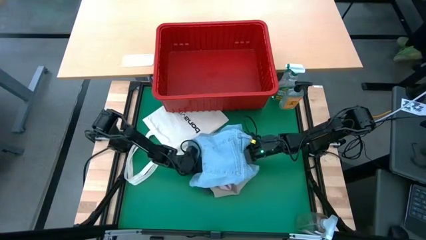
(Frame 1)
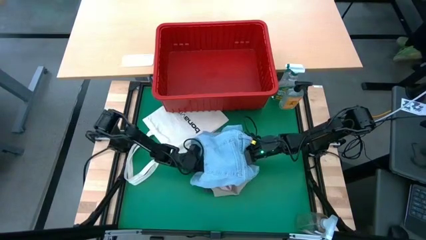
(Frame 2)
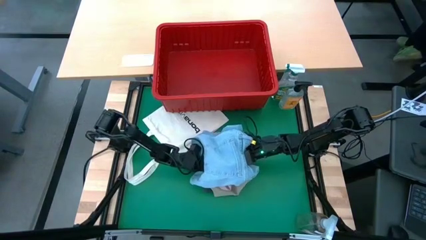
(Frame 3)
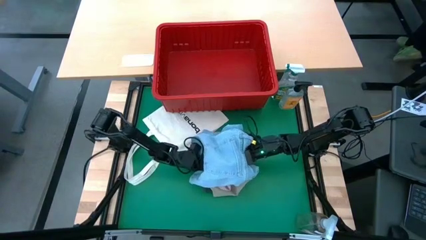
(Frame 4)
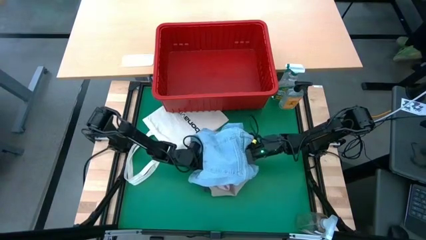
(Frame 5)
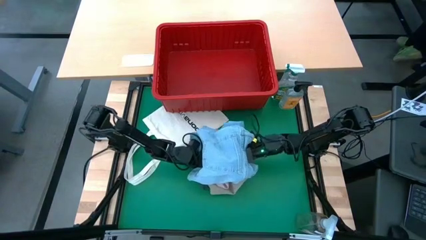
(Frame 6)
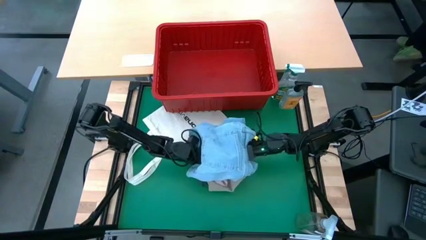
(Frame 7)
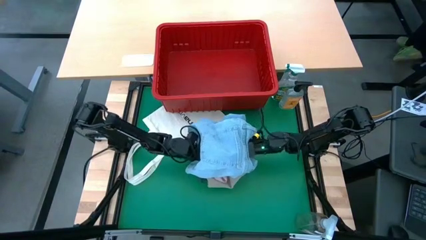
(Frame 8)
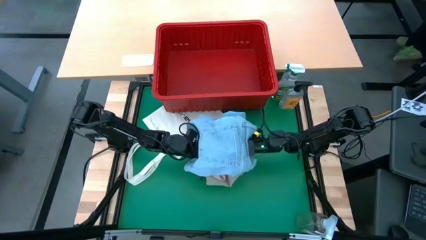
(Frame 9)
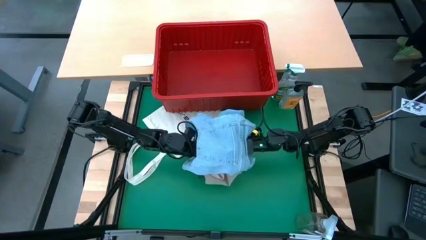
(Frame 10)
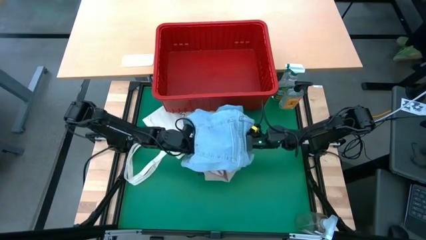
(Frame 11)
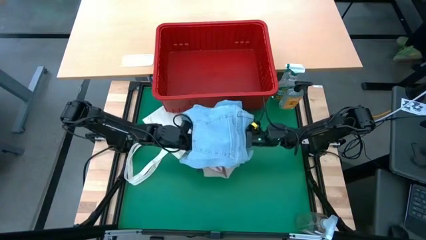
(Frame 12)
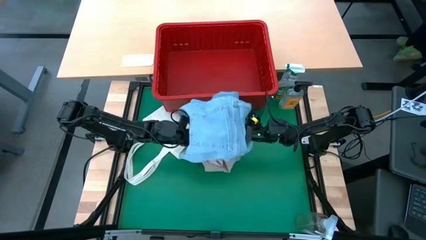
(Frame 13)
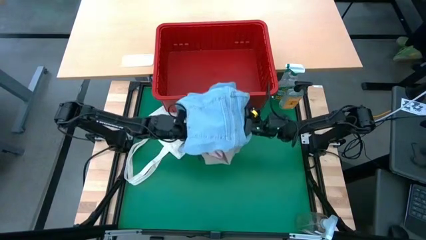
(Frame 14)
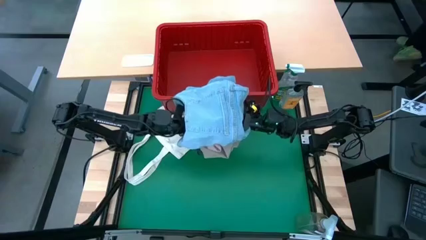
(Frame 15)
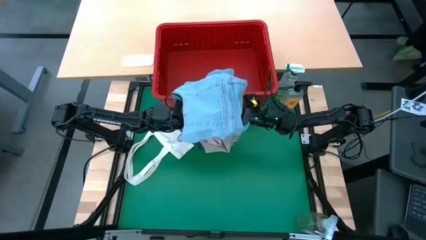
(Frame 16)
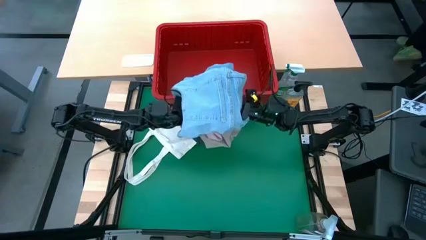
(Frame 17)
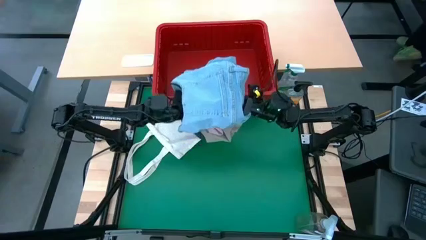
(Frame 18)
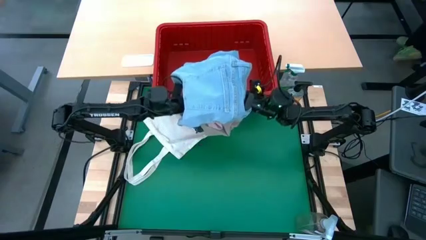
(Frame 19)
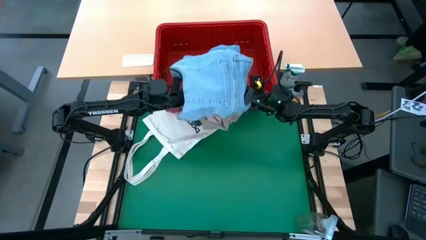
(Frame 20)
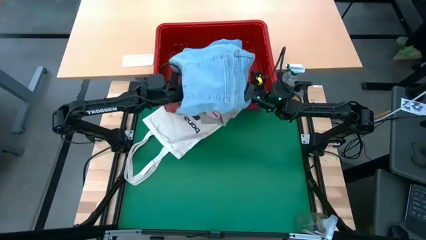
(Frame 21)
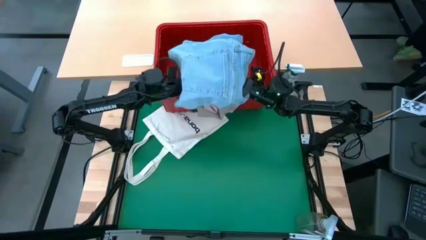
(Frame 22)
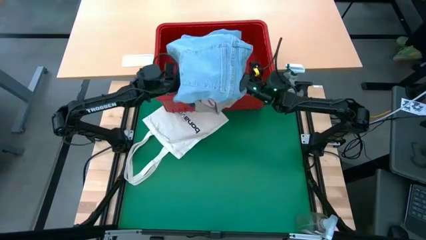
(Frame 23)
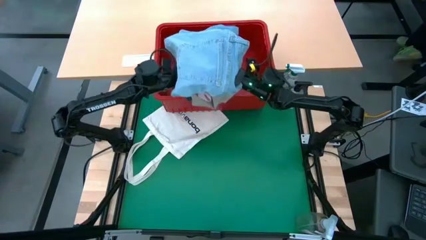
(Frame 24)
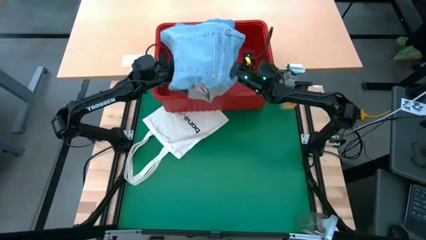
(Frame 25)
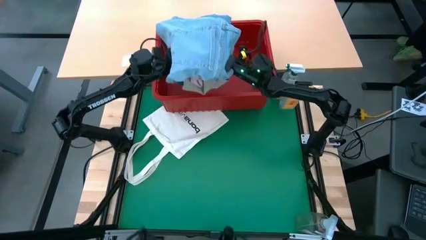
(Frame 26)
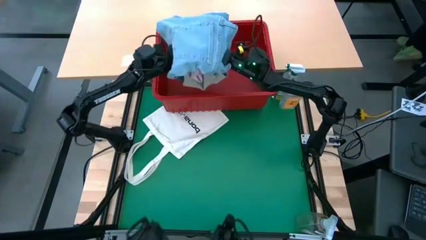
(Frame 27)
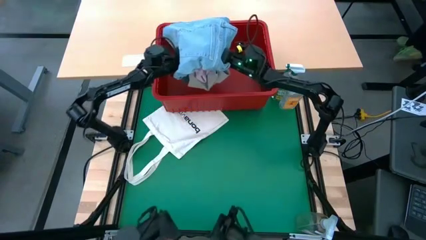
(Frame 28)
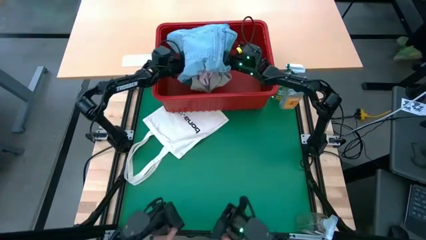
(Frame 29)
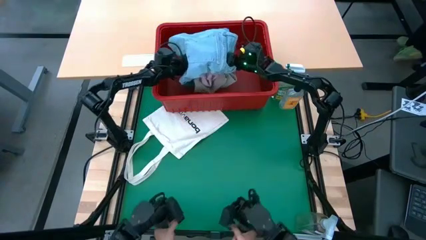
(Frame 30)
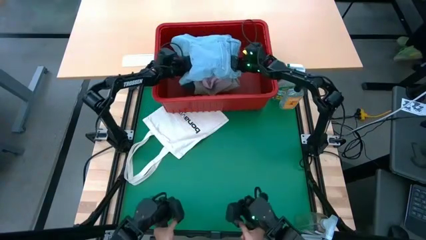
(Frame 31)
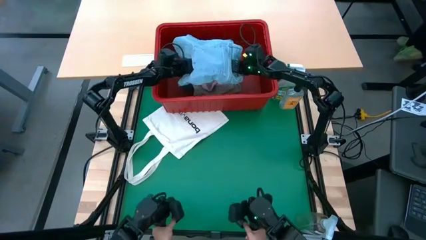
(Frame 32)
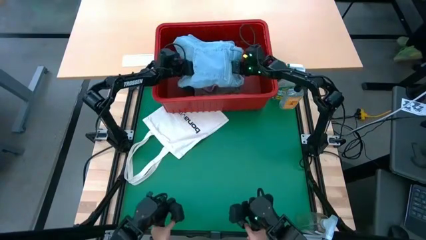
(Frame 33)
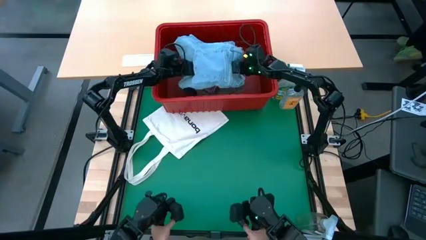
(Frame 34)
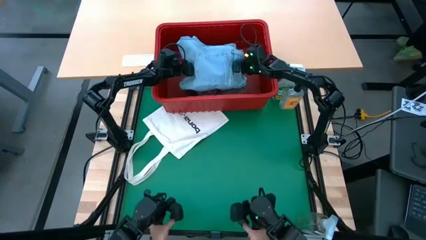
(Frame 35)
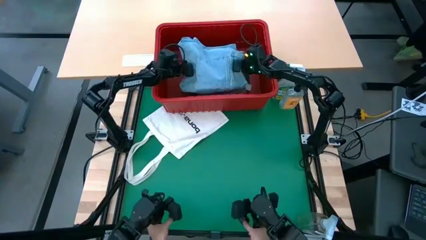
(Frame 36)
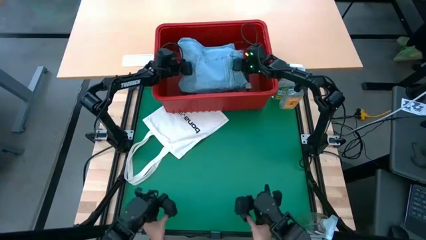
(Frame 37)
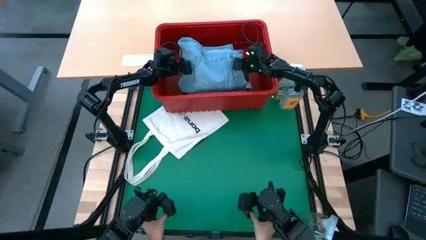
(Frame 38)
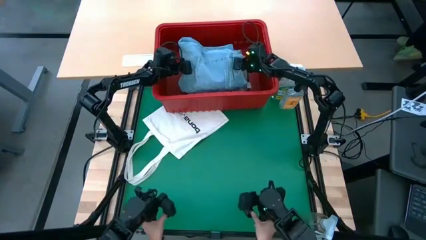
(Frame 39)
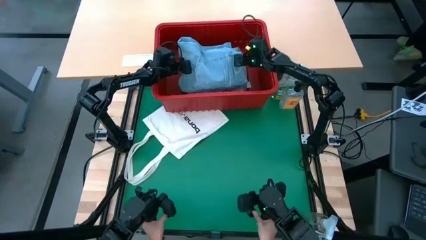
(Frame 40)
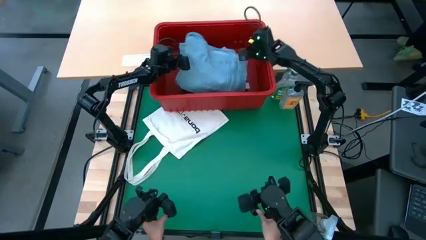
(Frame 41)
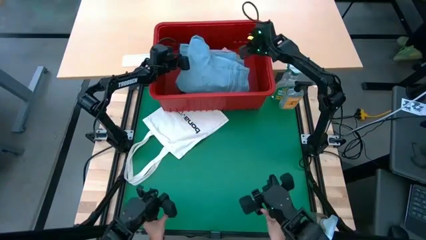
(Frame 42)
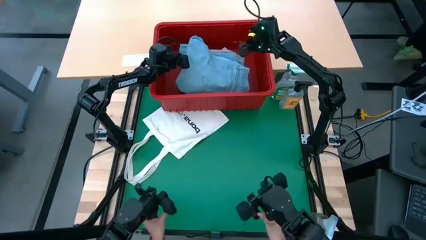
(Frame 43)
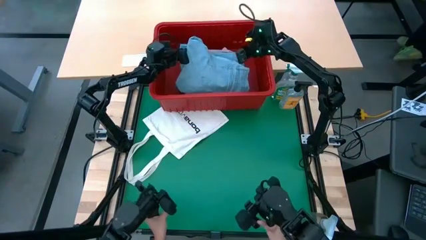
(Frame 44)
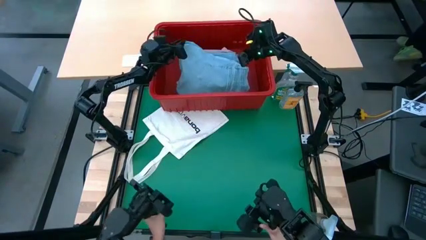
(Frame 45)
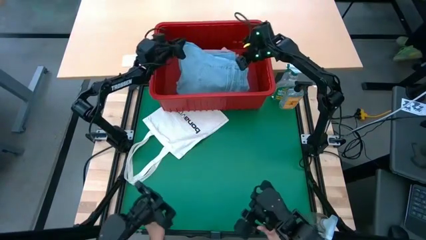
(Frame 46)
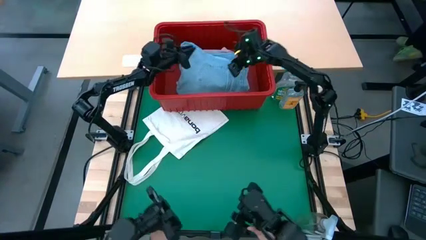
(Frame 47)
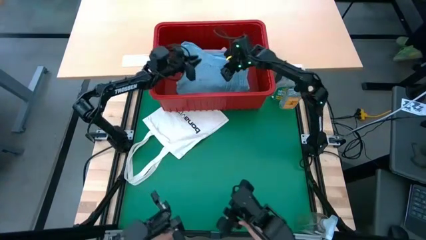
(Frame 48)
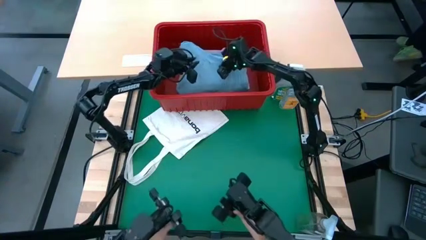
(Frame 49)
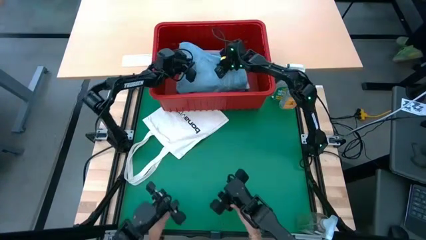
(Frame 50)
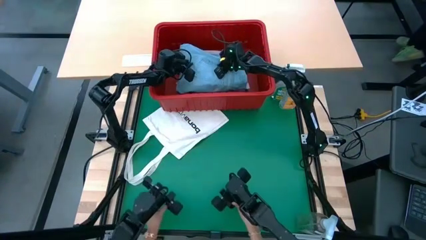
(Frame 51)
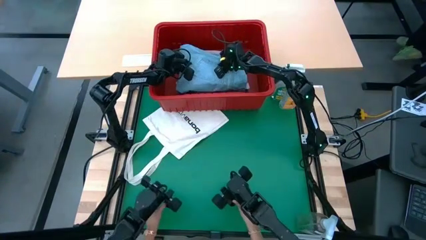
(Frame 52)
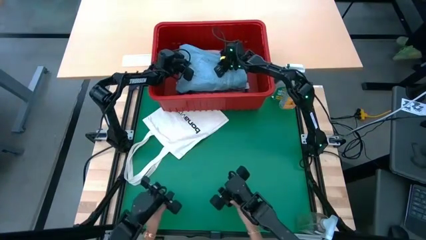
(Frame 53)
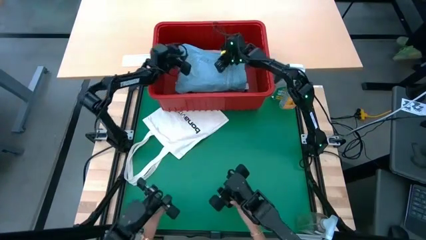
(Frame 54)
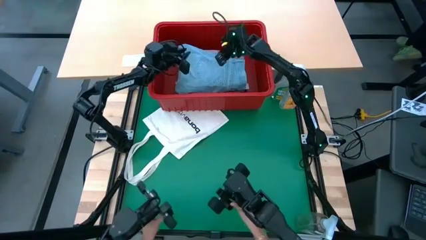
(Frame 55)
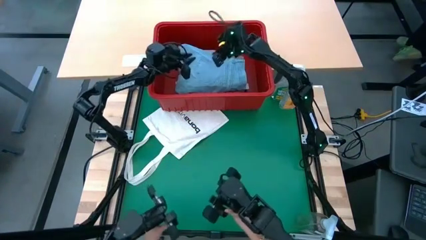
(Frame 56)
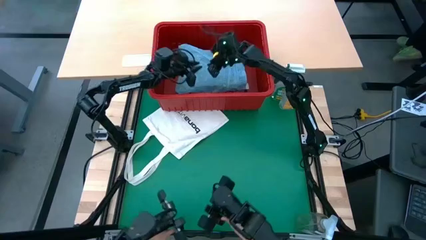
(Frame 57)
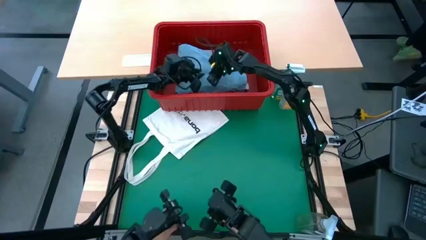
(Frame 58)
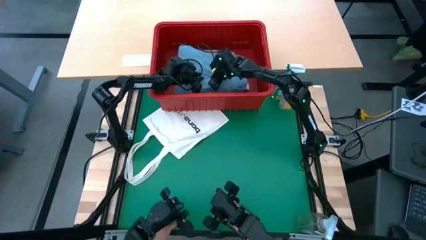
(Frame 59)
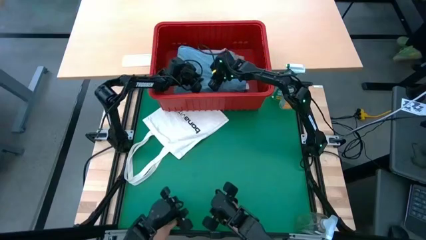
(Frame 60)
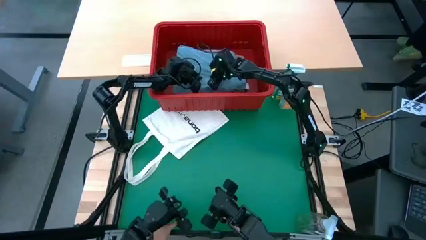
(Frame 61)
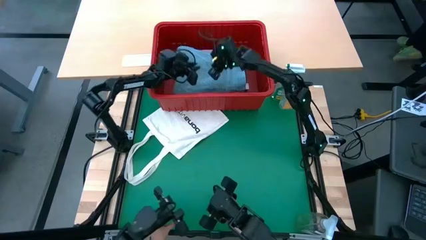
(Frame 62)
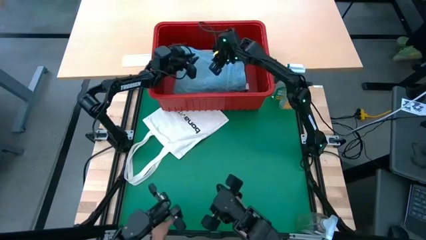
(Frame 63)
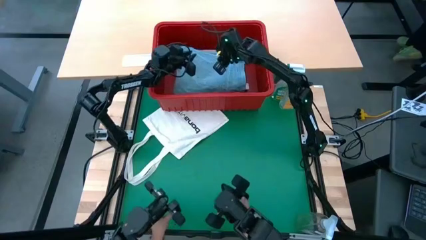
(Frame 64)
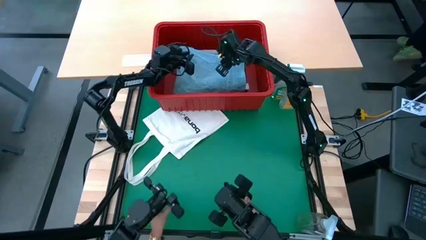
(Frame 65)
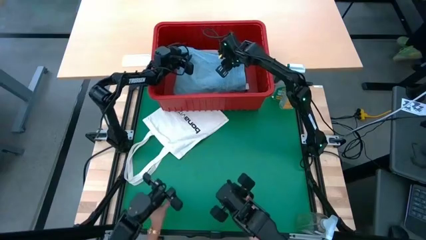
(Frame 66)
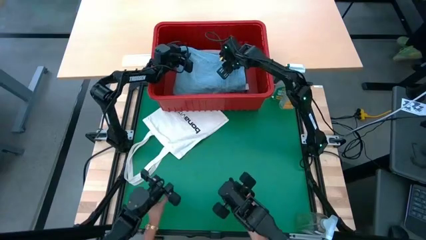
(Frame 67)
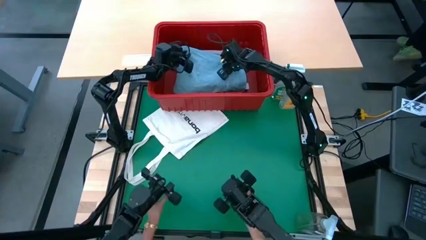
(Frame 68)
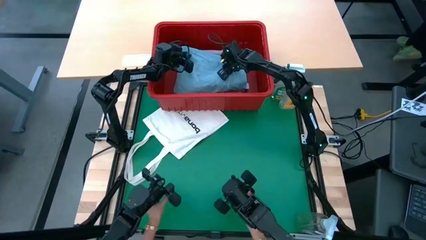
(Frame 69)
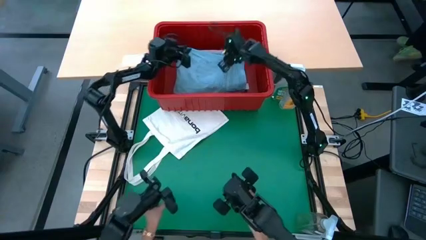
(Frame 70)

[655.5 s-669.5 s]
Task: Fold laundry
Put the stacked clothing into the red laundry bin
